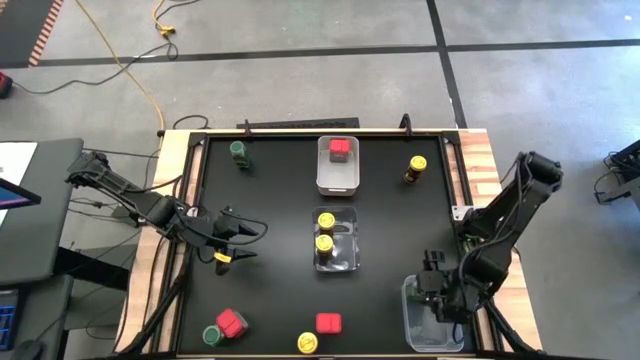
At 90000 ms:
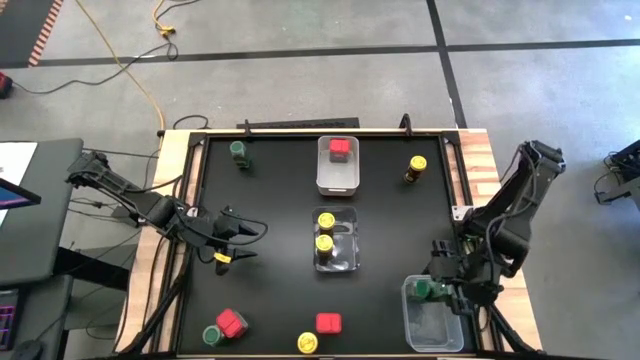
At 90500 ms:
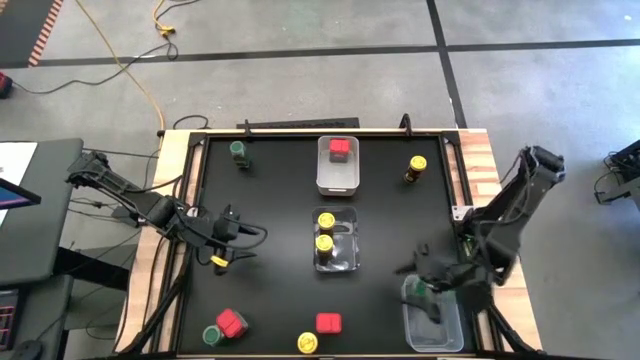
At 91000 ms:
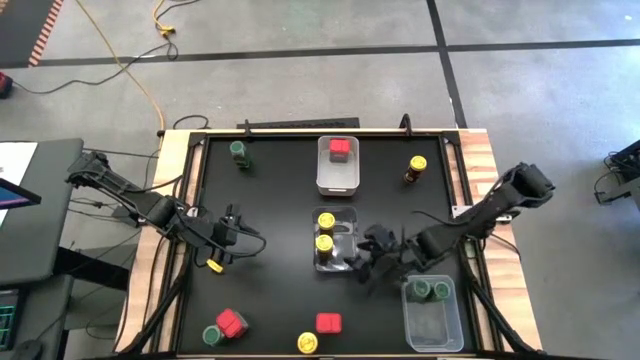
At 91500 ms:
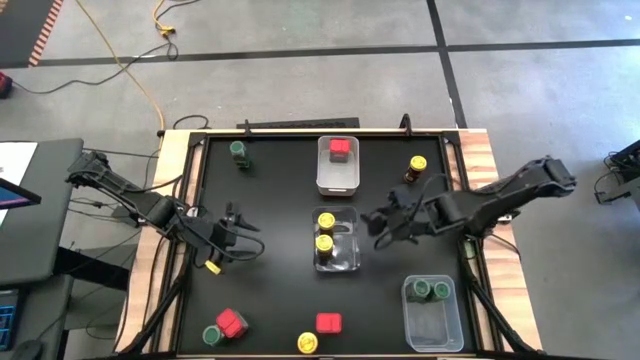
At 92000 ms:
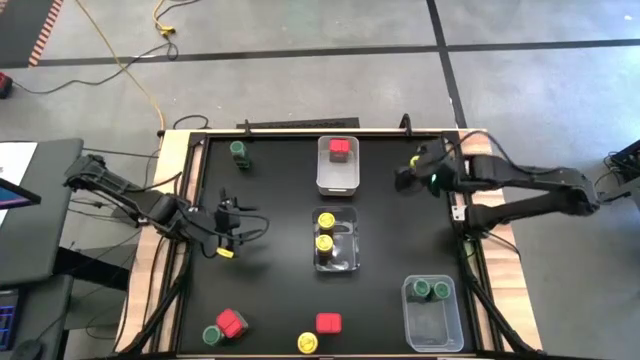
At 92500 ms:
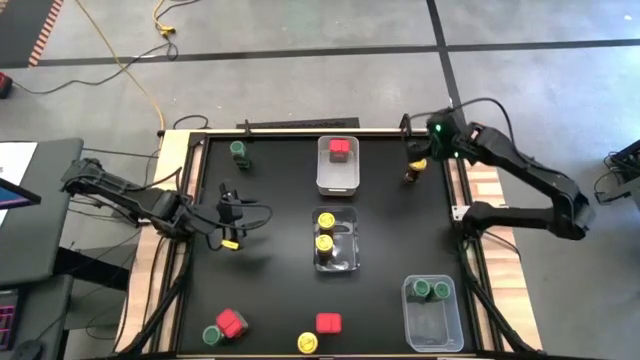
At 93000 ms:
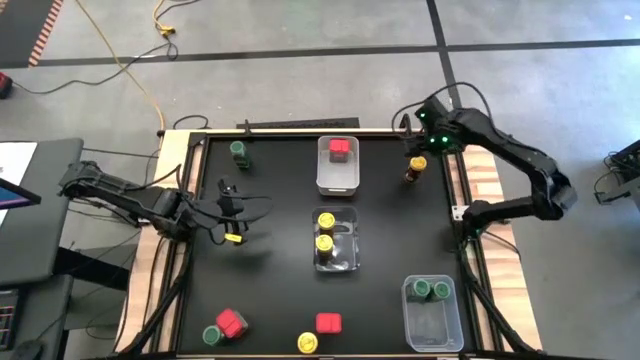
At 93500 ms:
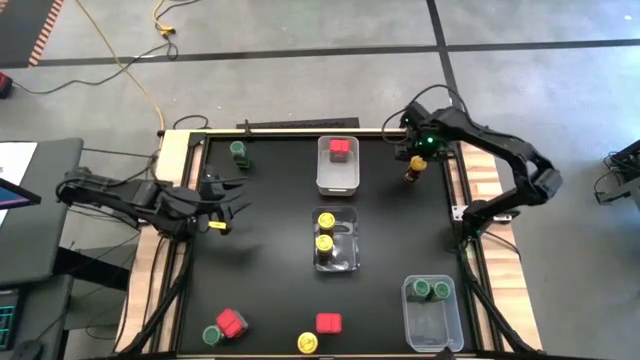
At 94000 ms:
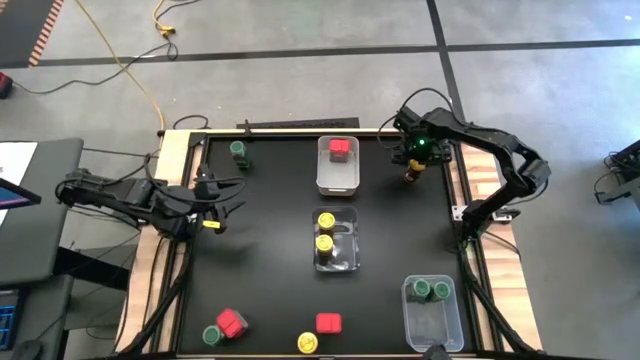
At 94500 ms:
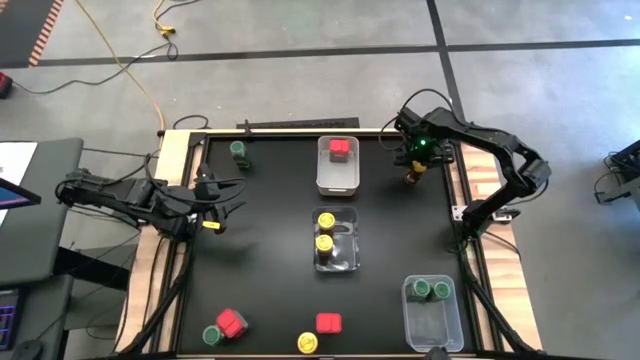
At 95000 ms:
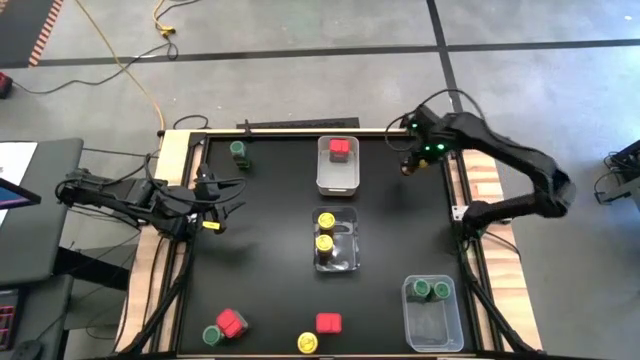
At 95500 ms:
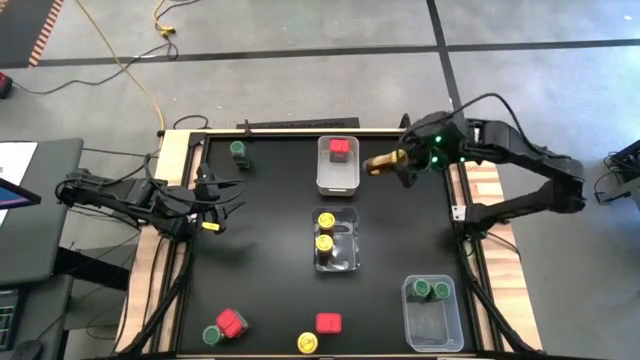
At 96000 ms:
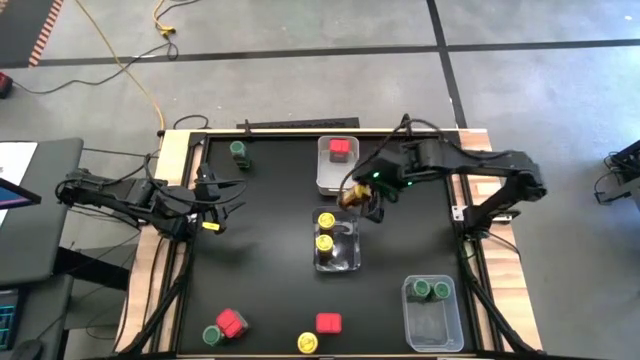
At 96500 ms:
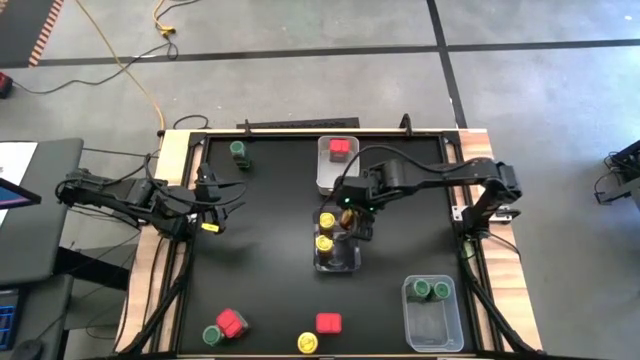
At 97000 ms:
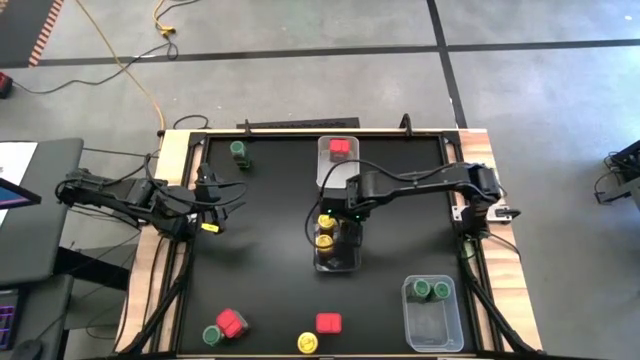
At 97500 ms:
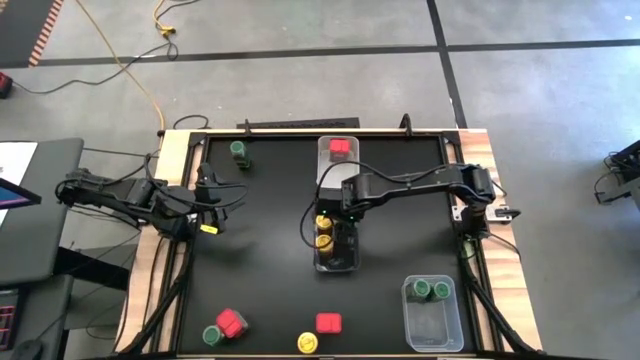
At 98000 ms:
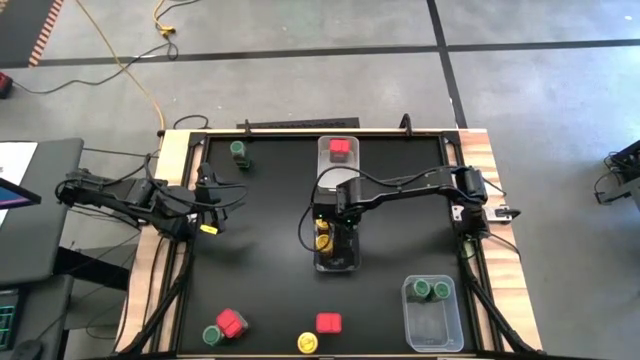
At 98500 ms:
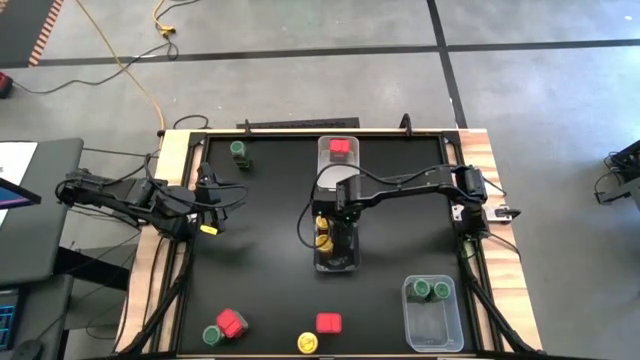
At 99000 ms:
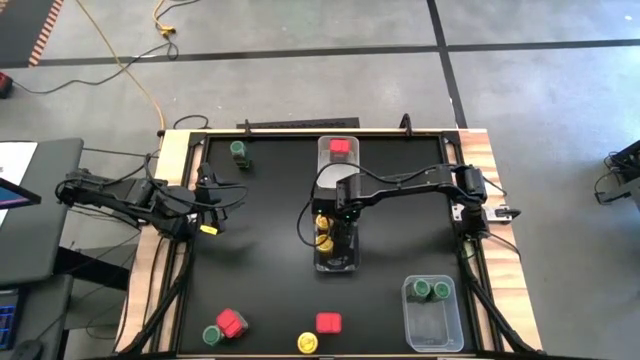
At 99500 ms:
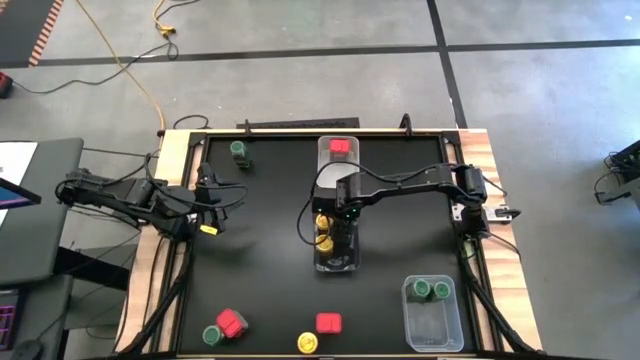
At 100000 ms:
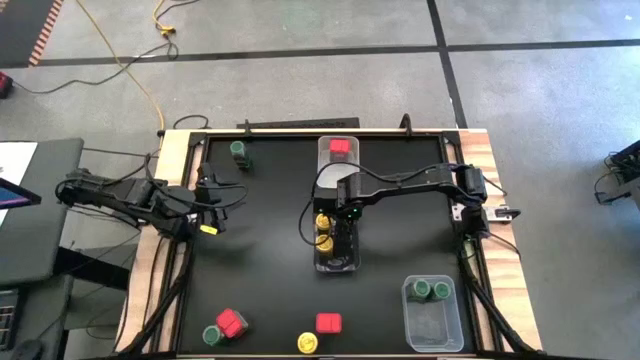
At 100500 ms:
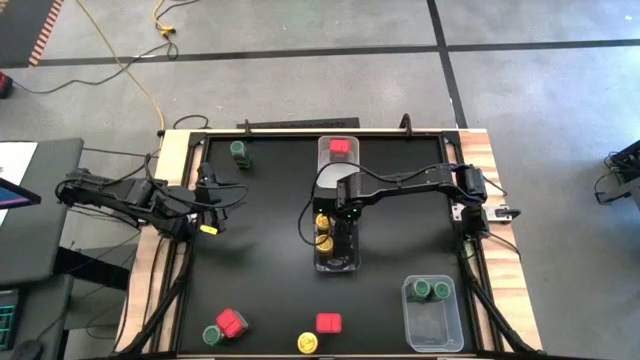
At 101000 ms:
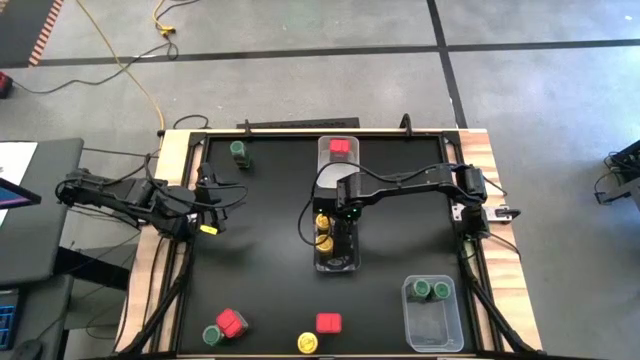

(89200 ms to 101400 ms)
Task: Sort spices by type
Put the top yellow seasoning bottle into the black bin

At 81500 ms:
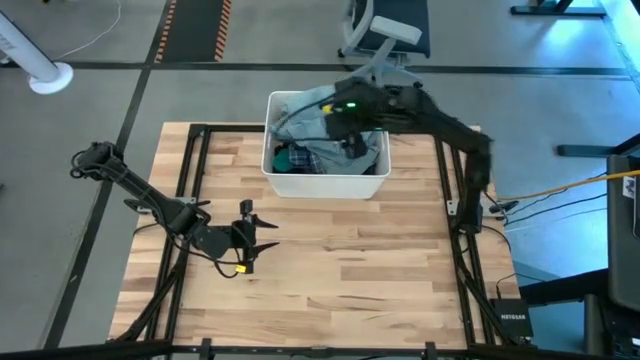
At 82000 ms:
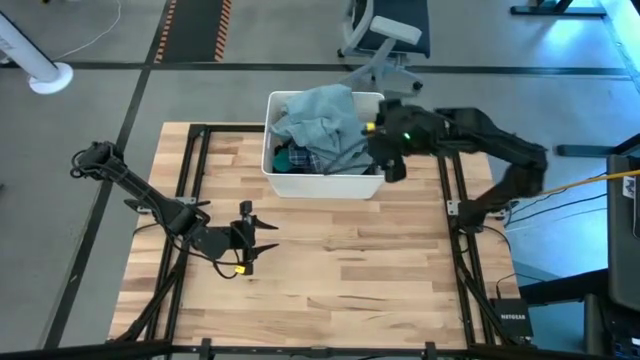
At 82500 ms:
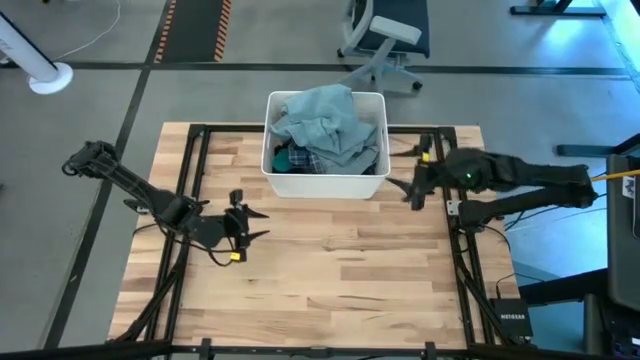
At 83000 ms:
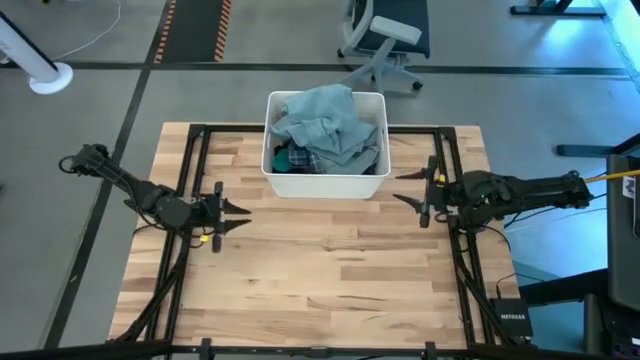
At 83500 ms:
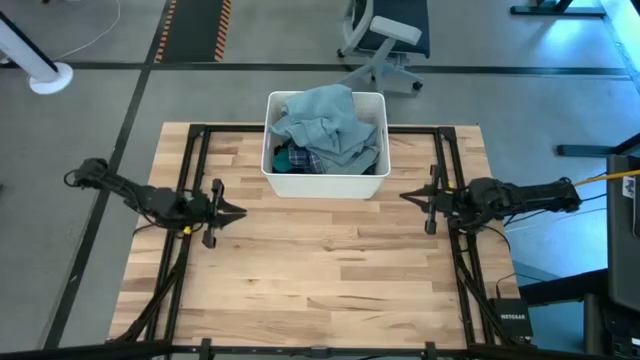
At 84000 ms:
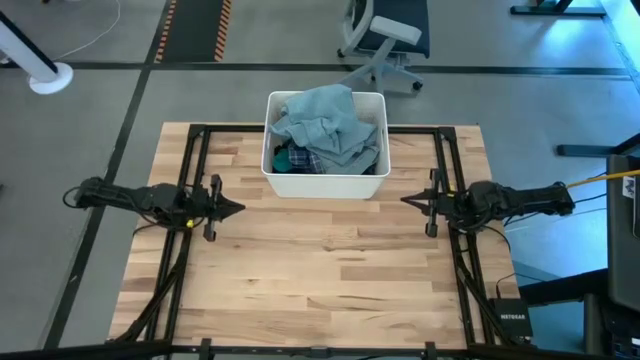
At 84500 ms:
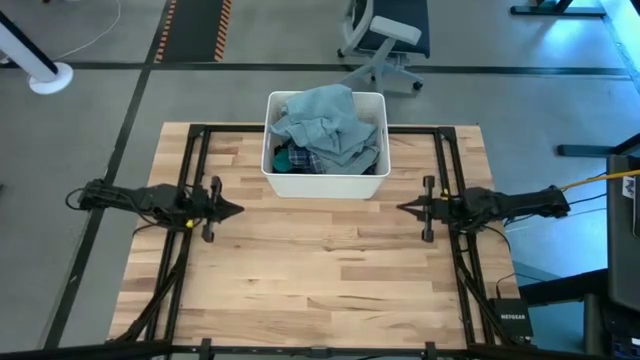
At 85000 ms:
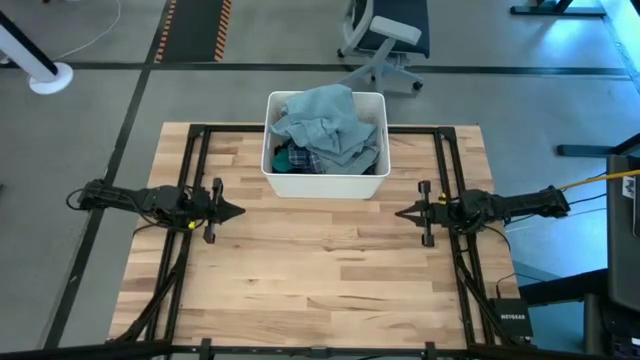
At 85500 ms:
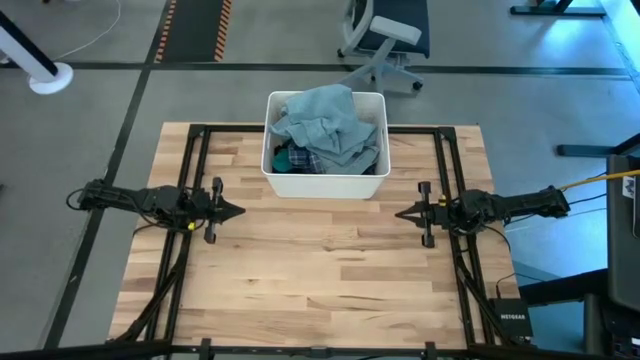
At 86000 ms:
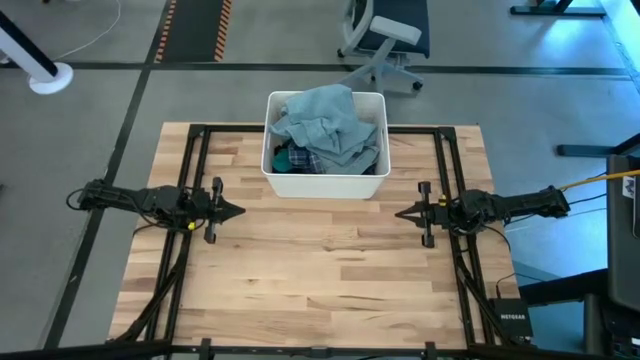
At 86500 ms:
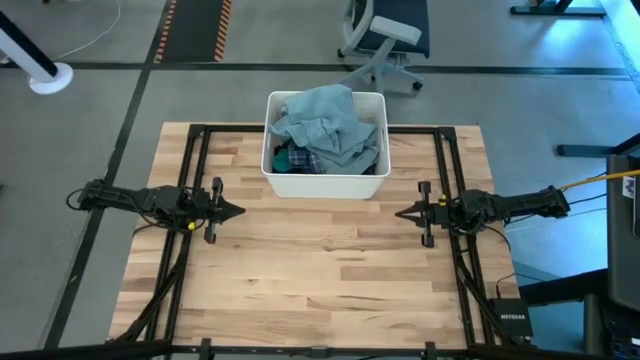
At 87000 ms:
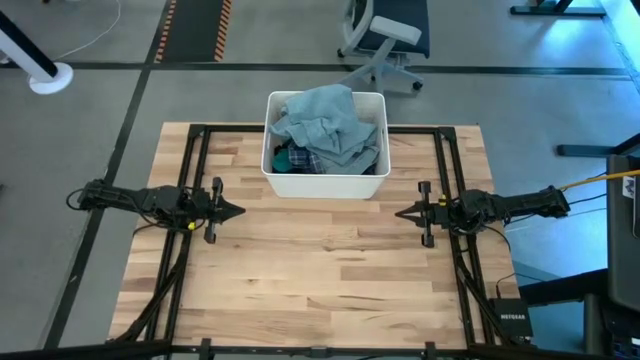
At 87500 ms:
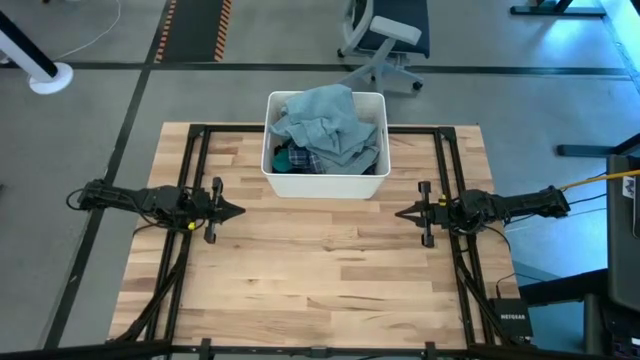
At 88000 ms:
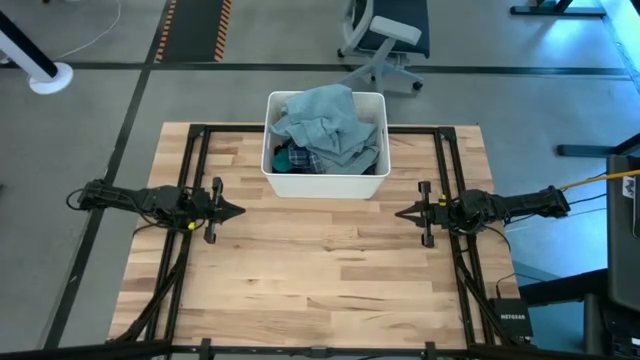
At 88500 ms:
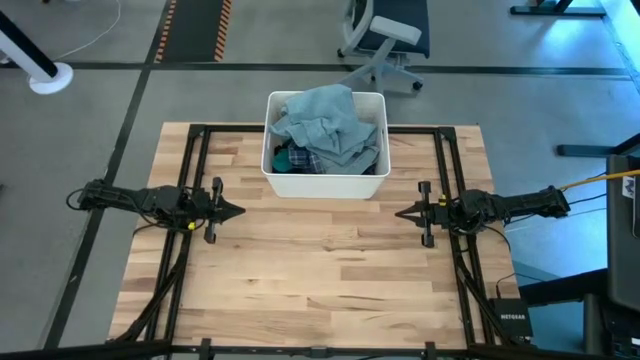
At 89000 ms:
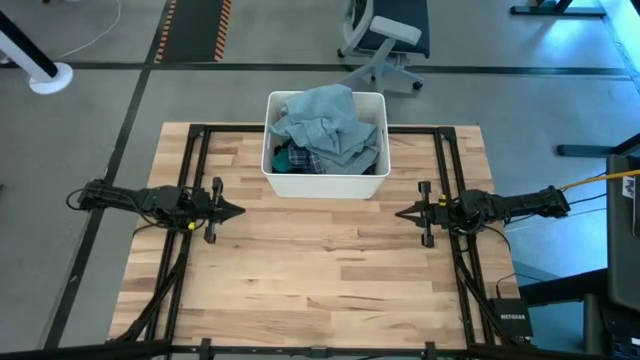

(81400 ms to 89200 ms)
Task: Sort clothes
Return to Home Position
